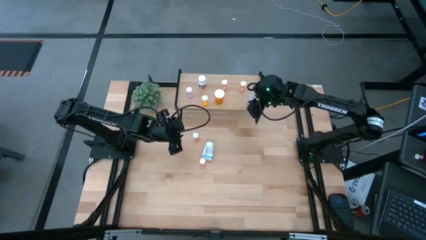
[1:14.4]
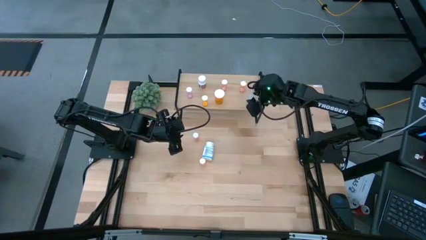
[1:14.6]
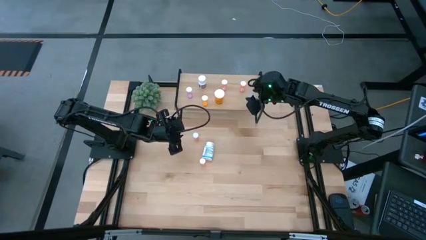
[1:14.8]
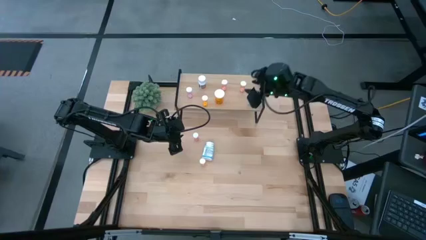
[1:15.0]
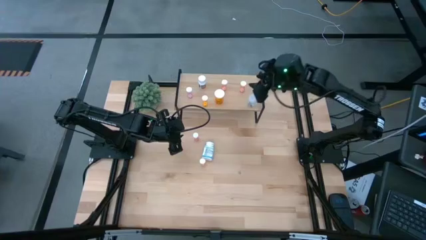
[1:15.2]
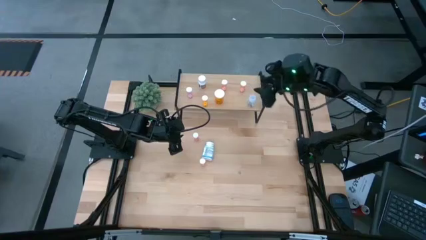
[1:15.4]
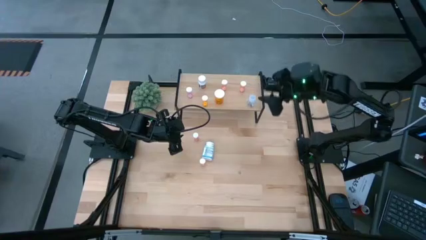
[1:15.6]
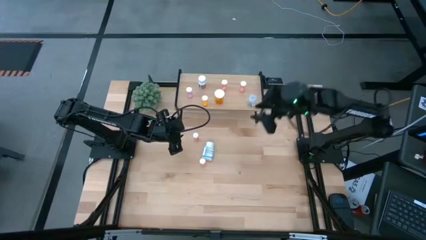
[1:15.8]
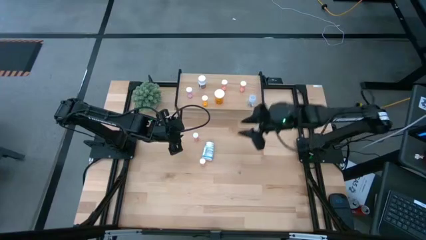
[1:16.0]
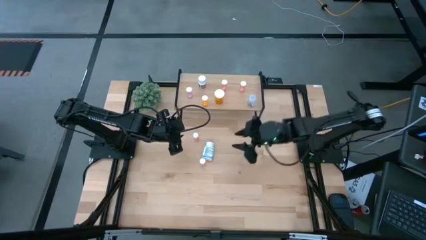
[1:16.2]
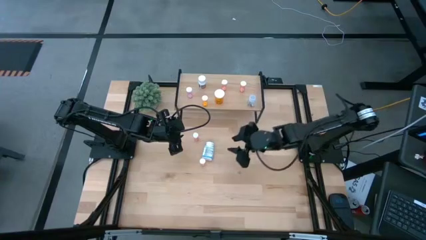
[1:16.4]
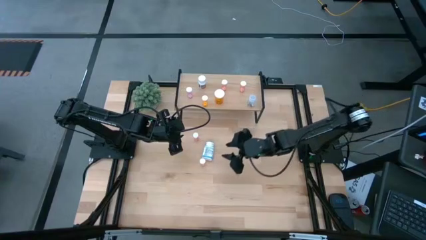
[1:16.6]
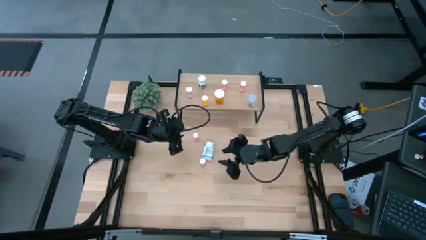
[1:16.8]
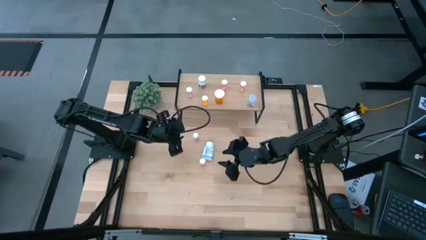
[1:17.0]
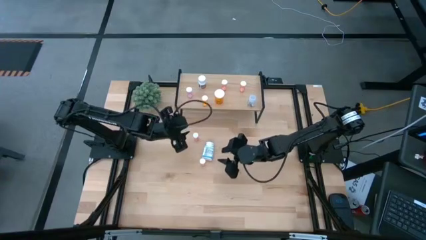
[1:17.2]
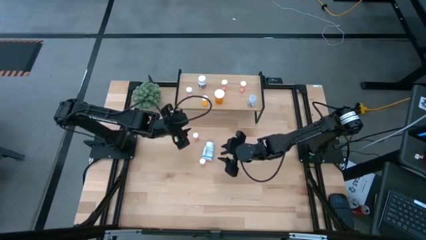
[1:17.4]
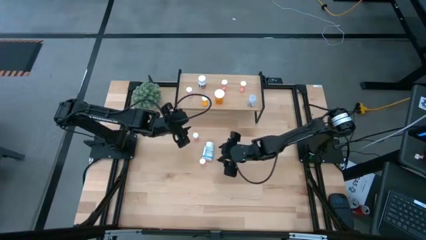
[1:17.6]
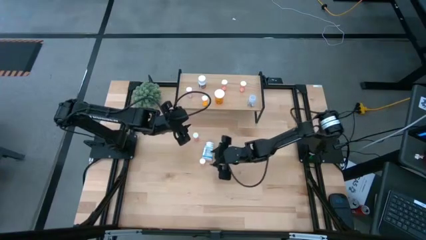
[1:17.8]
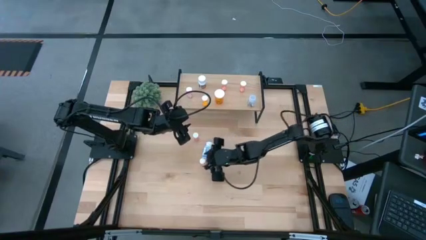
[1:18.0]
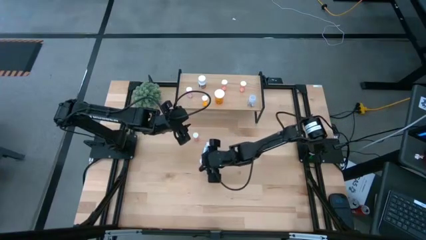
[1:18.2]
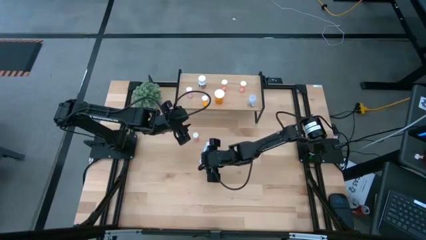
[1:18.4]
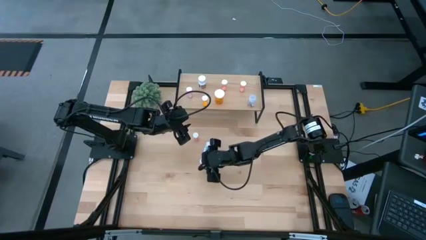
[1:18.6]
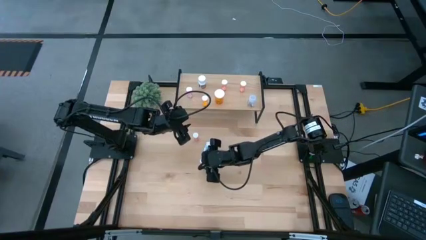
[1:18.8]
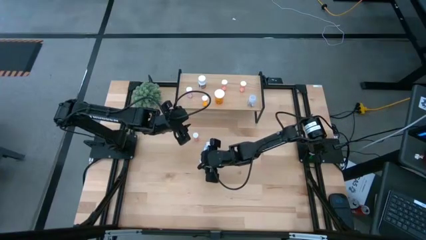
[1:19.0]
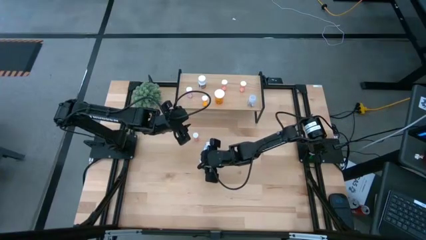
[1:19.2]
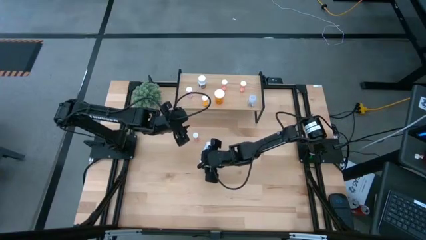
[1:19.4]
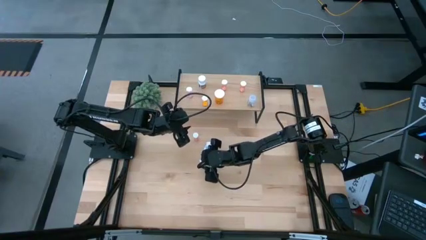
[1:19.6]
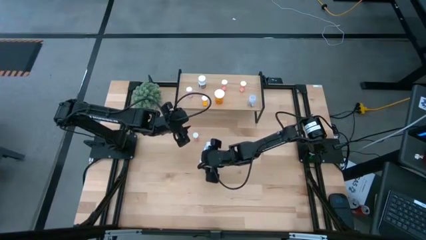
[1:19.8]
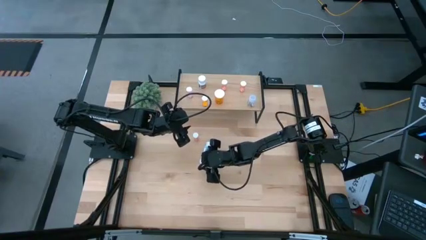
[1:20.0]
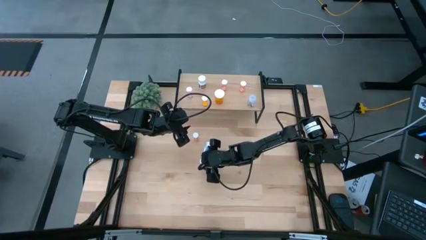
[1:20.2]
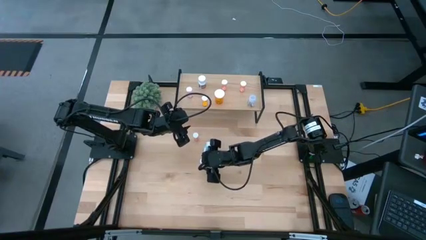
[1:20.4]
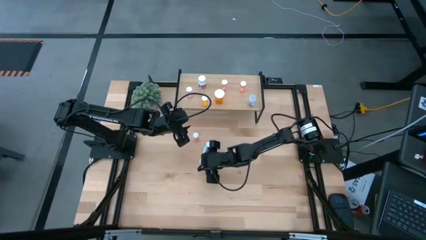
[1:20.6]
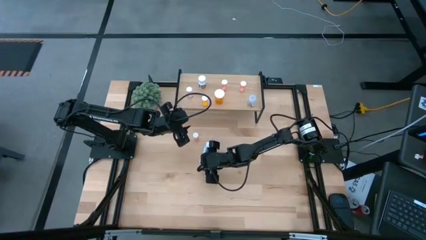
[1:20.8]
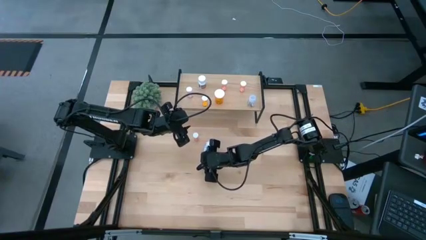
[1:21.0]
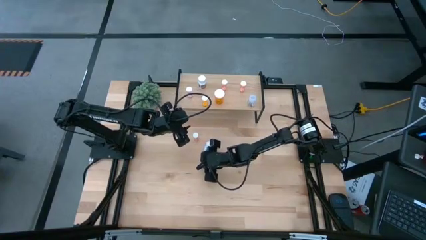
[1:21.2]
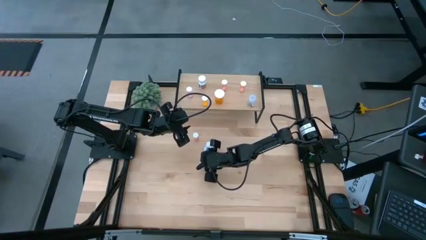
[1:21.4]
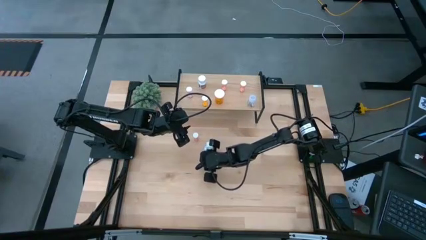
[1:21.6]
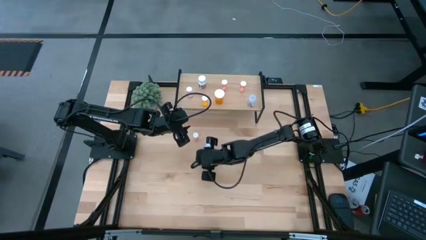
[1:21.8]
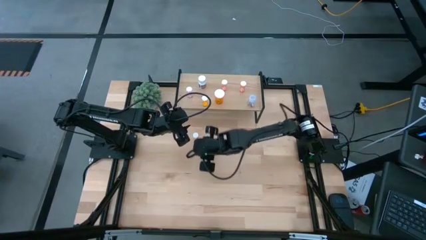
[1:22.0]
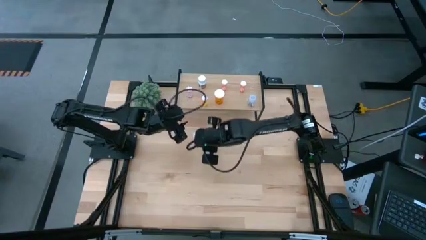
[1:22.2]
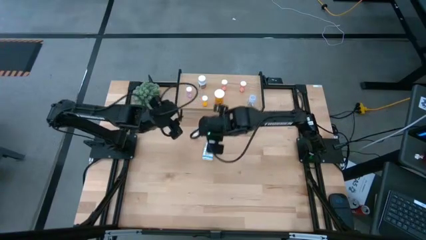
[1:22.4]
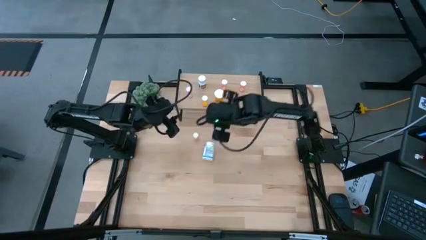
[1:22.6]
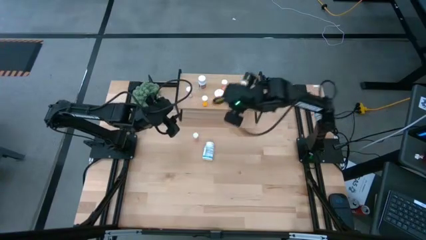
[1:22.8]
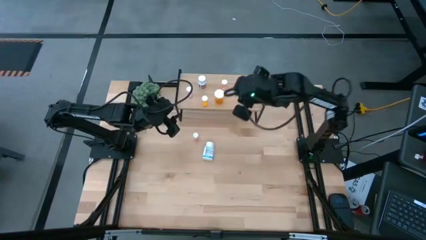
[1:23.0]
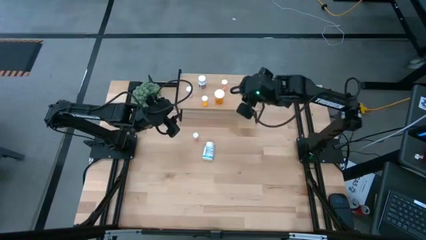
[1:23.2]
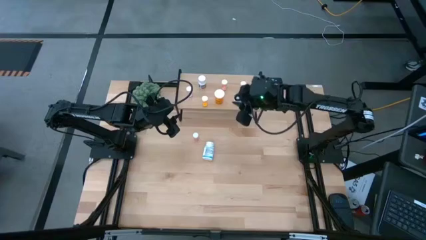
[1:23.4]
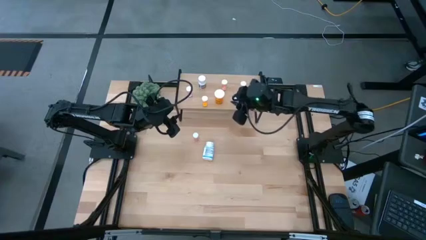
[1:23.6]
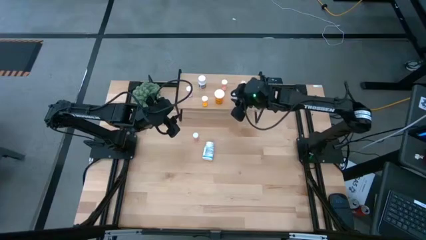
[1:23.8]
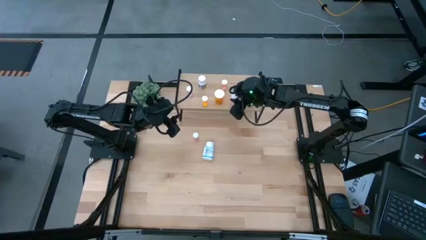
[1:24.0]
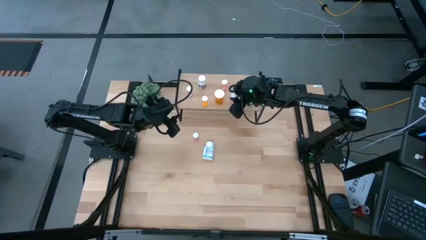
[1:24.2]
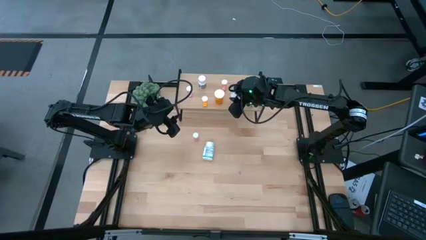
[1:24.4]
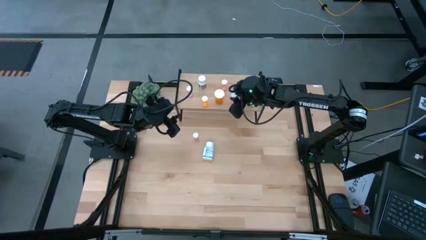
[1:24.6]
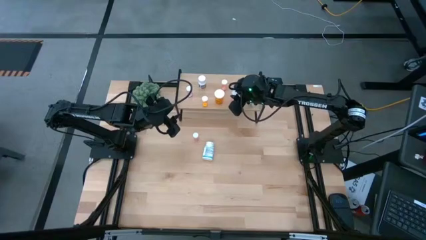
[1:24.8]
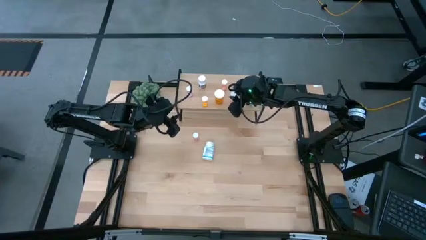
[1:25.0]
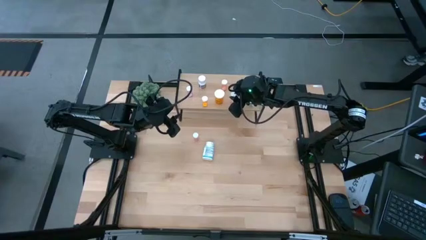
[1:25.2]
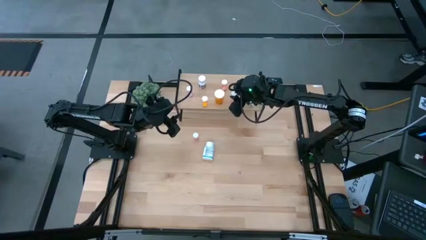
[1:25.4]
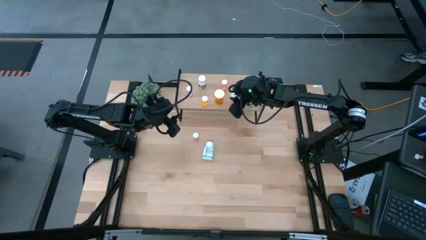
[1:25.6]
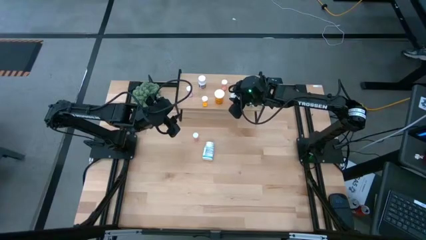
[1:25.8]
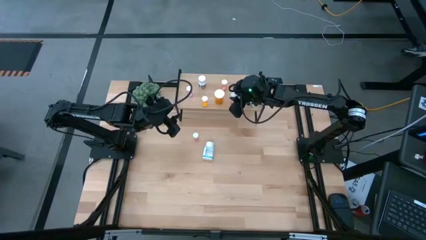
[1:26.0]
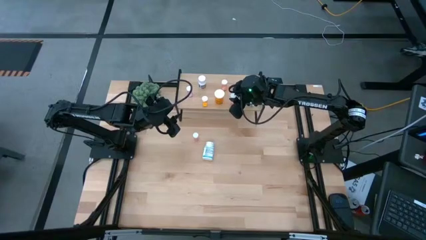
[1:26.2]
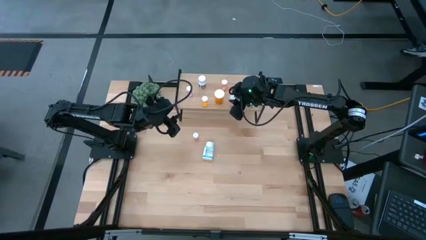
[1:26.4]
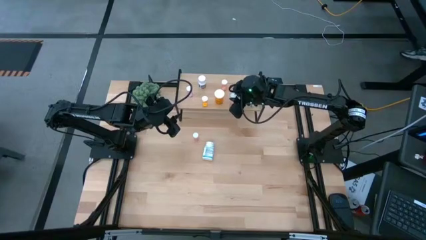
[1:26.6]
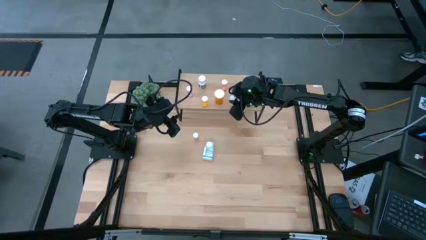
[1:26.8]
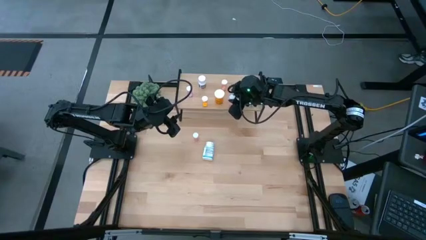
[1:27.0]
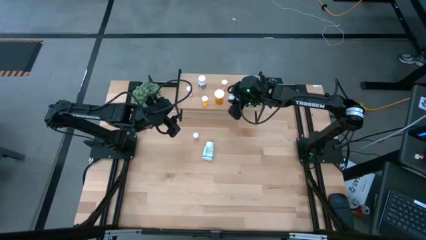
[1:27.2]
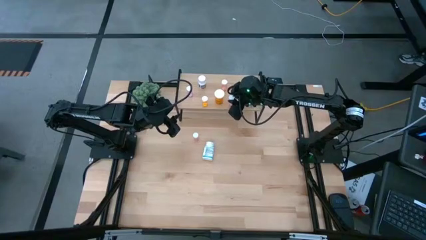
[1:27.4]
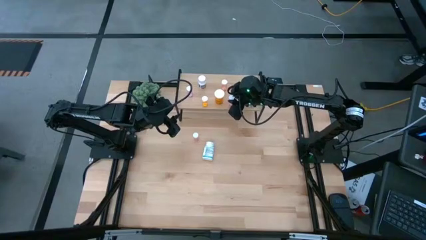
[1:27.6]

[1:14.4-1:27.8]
Task: Pick and place medicine bottles onto shelf by color
Put the pink pill bottle on the shelf

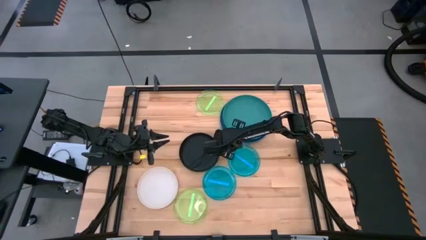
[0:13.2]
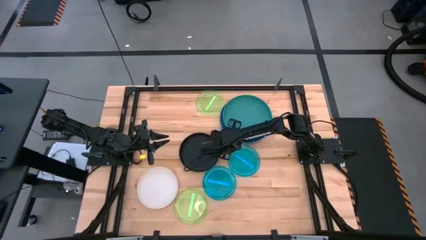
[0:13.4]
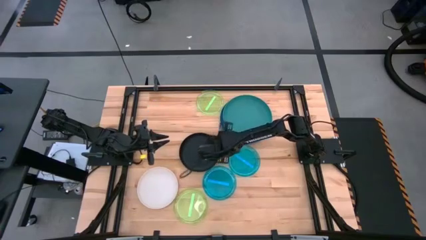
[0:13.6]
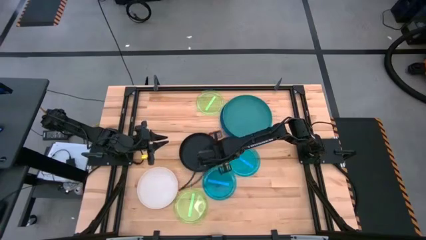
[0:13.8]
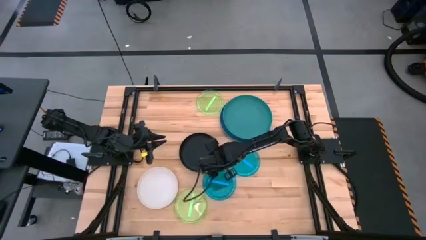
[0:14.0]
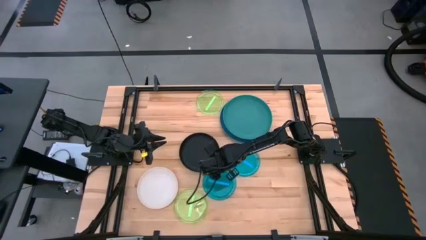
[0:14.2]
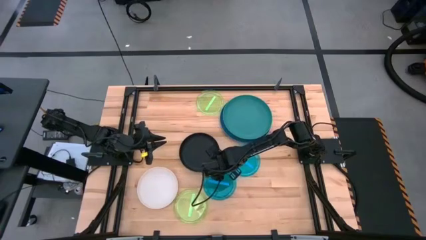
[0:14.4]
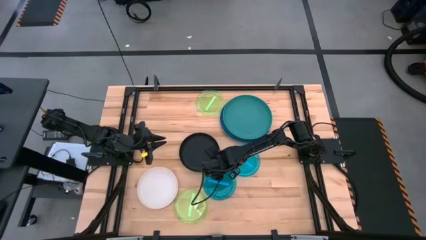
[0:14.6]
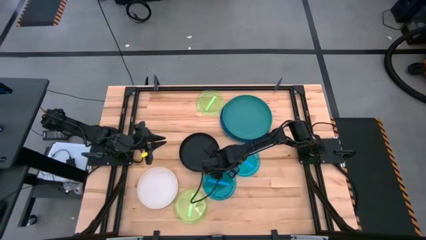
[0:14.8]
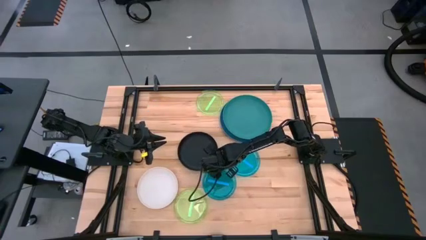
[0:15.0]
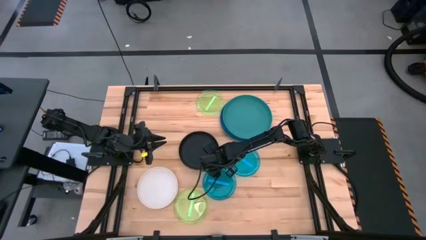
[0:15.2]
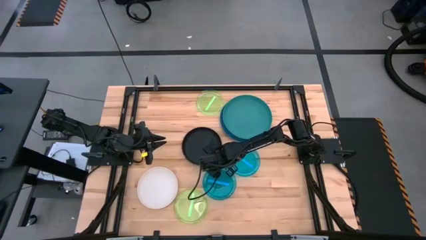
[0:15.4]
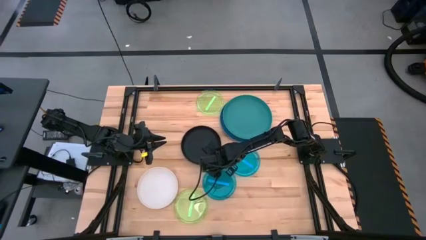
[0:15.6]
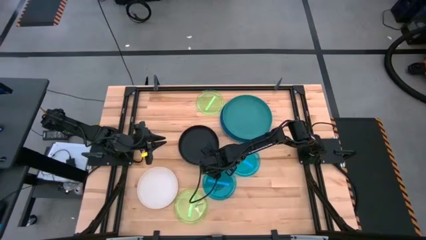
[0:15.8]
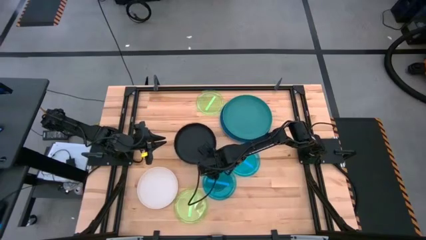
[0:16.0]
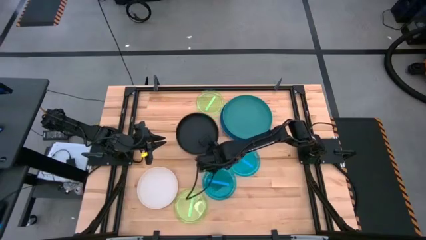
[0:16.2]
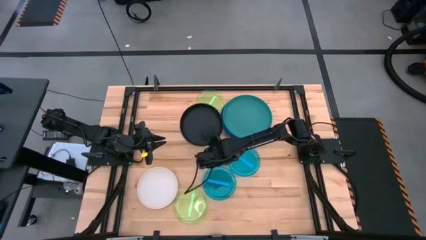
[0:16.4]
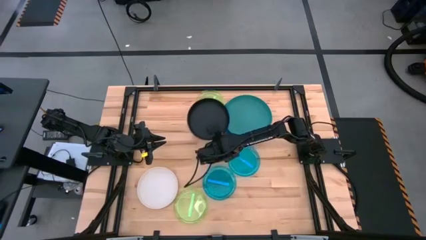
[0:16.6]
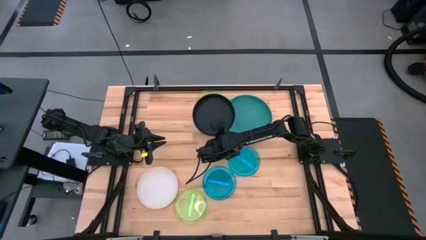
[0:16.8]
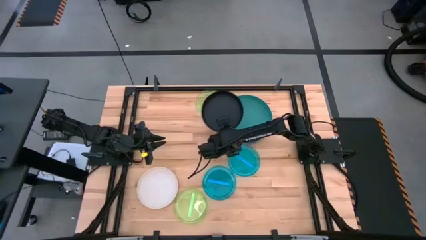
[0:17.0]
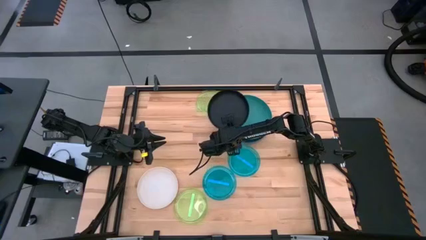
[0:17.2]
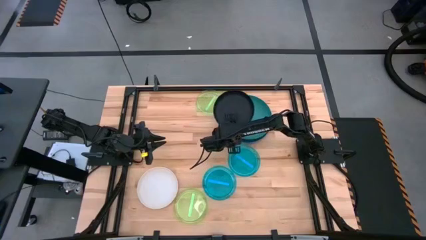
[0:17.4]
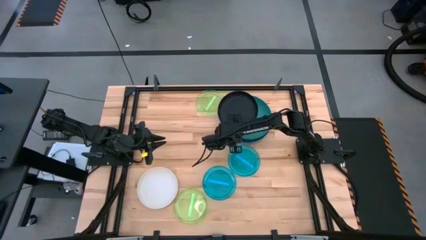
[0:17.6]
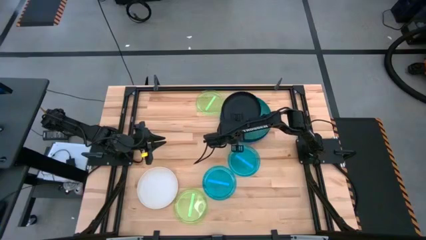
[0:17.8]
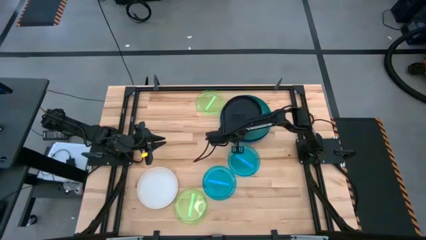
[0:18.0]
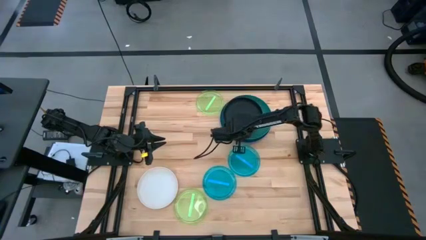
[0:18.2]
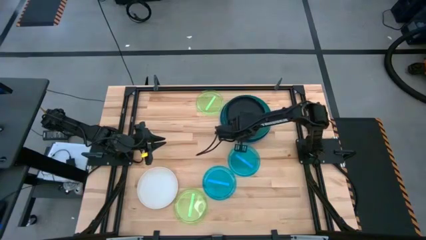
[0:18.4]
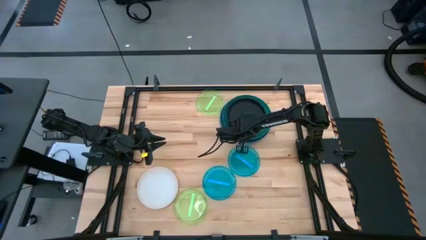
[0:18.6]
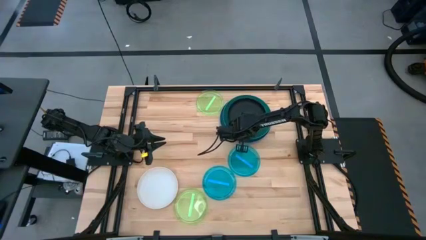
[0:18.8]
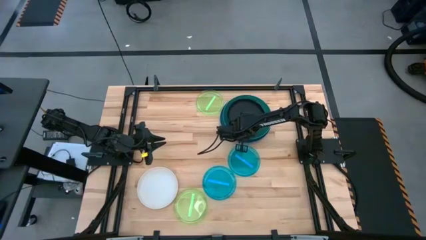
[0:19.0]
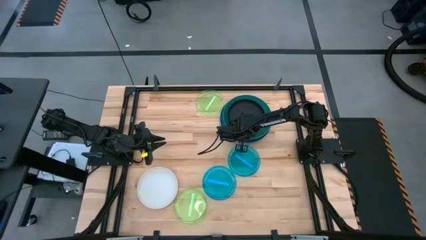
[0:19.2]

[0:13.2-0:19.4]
Task: Stack plastic plates
Stack the black plate on top of the green plate
